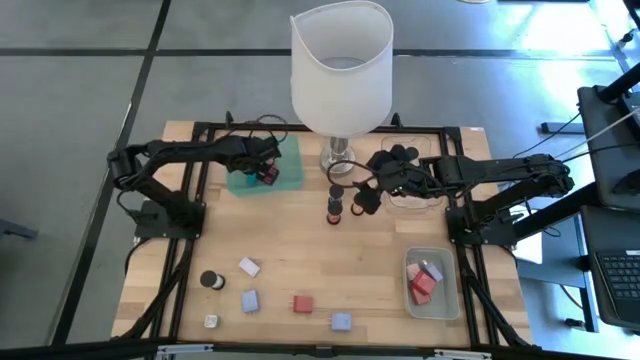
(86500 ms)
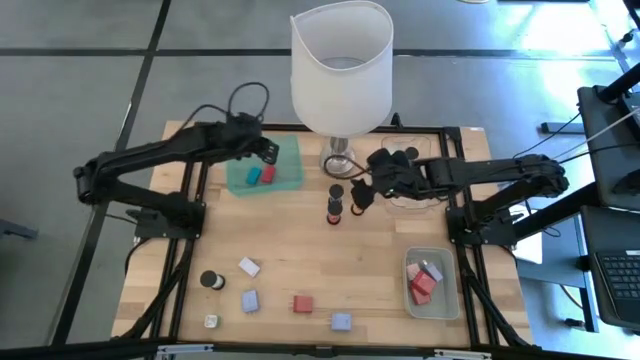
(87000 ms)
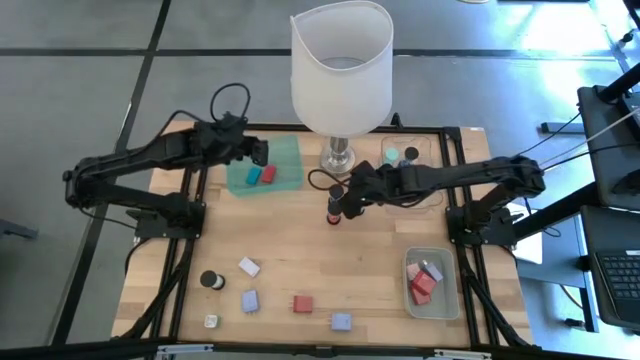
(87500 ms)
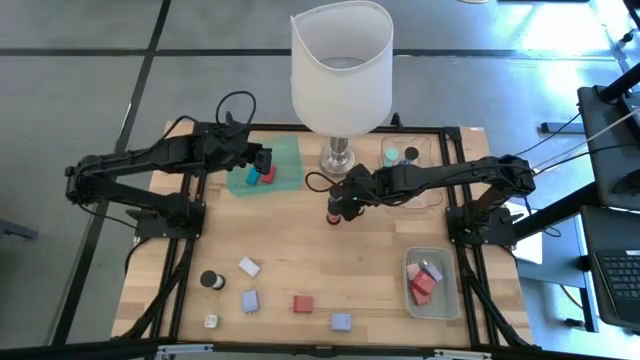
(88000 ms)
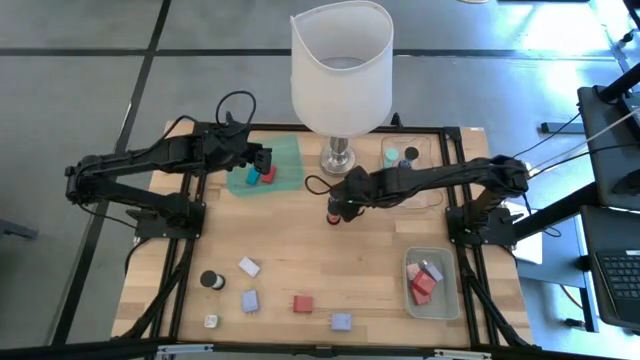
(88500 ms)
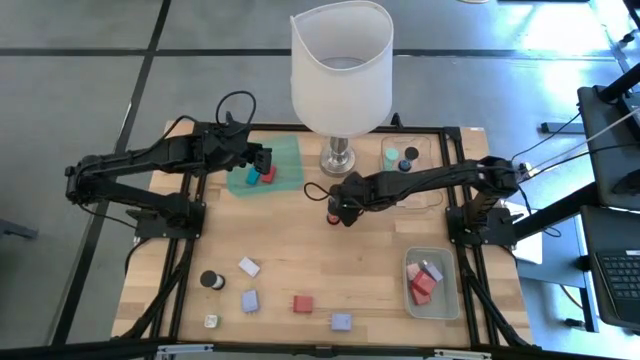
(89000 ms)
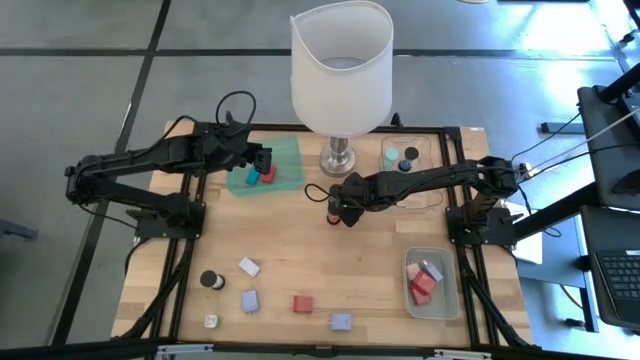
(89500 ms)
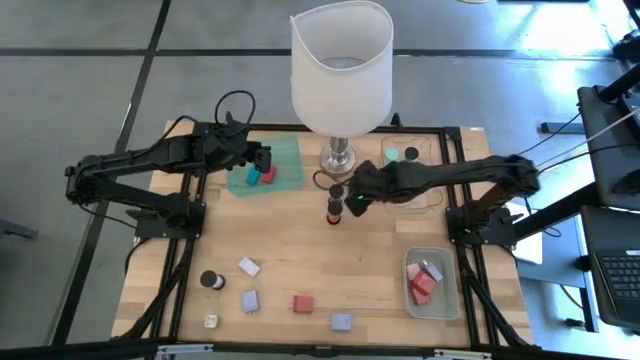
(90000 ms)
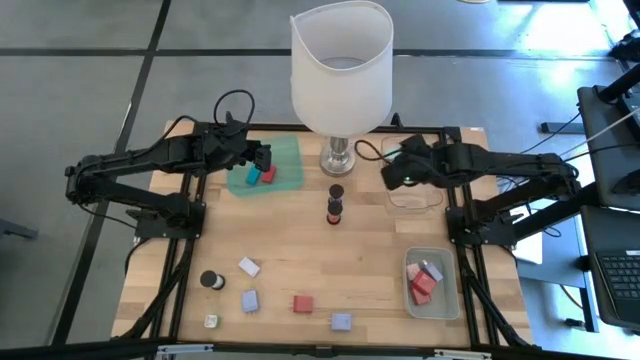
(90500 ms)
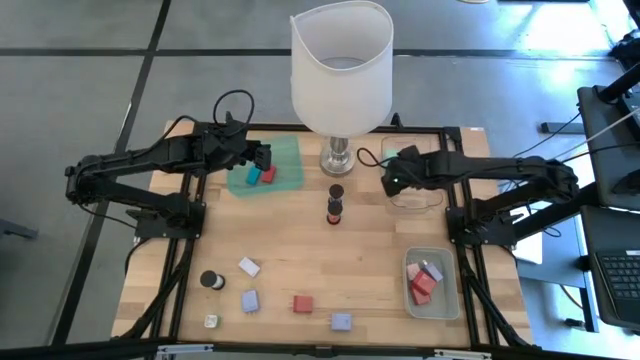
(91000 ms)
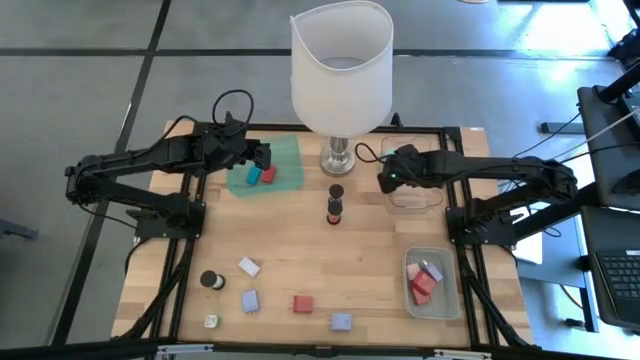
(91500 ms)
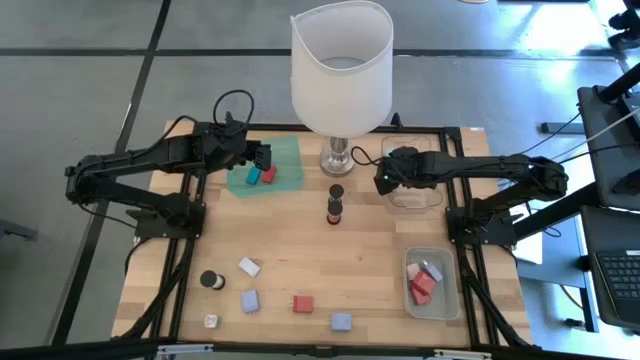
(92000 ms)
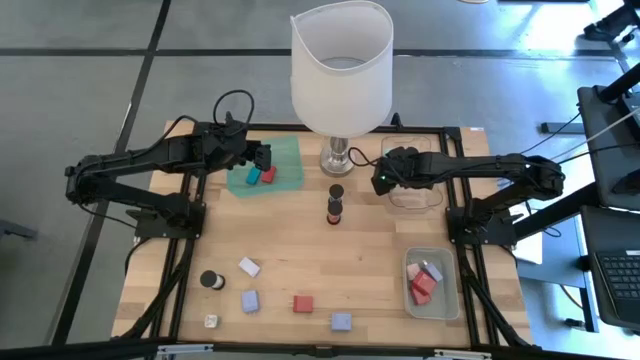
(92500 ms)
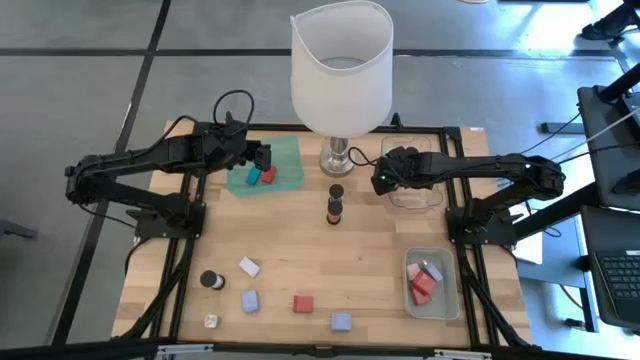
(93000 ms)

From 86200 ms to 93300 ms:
Task: Pick & Place Office items
Put the yellow hourglass into the transparent bin

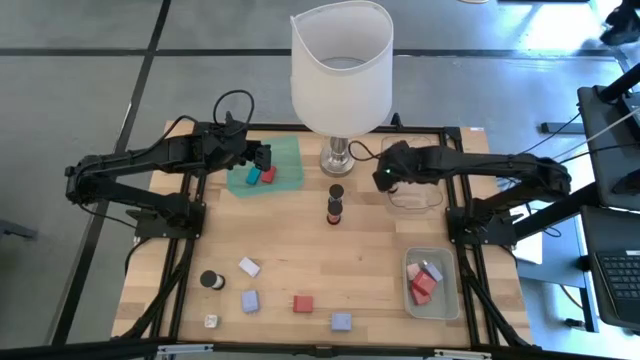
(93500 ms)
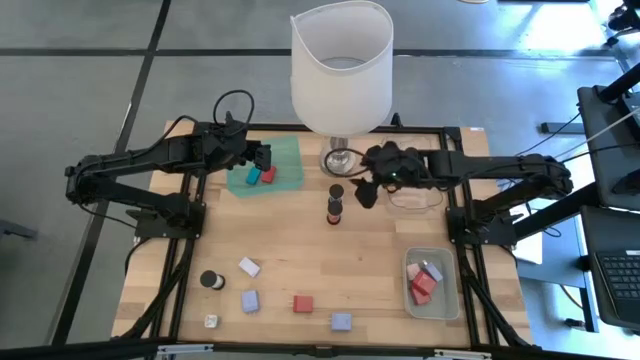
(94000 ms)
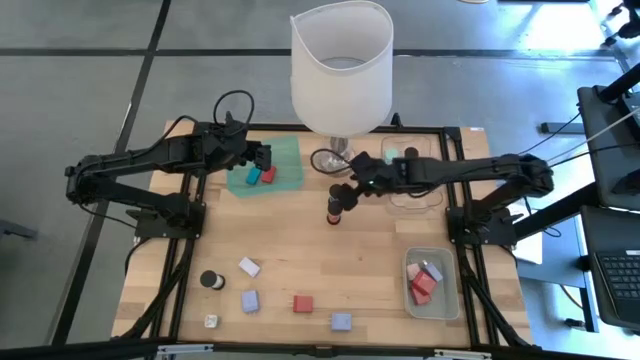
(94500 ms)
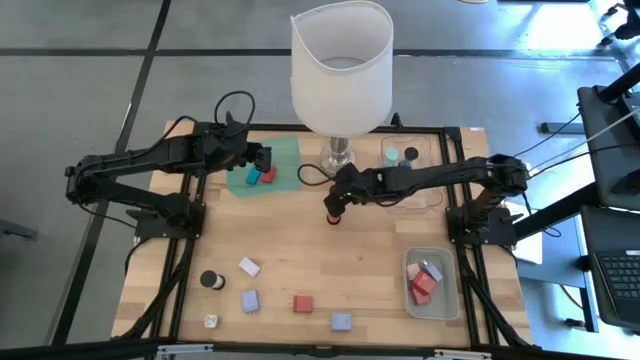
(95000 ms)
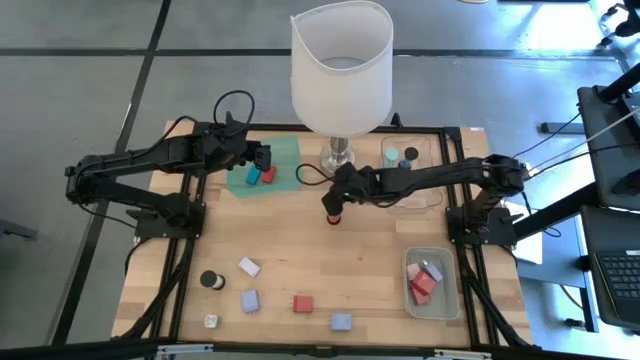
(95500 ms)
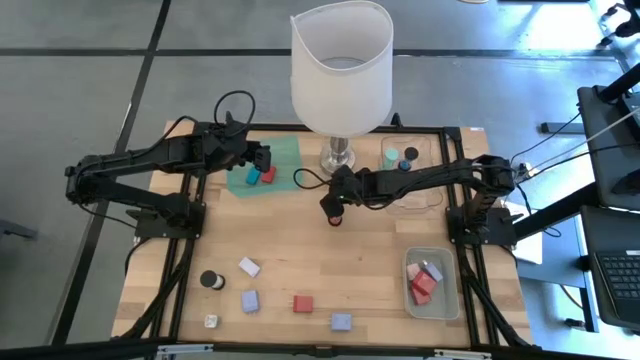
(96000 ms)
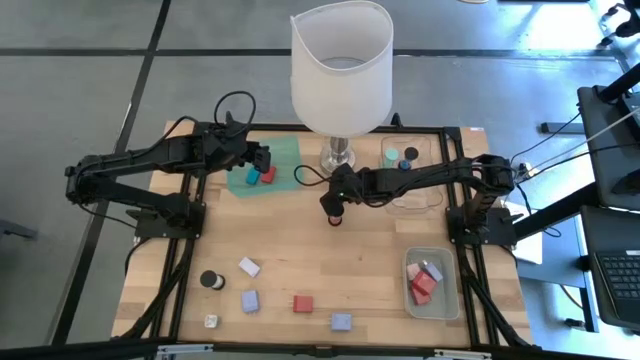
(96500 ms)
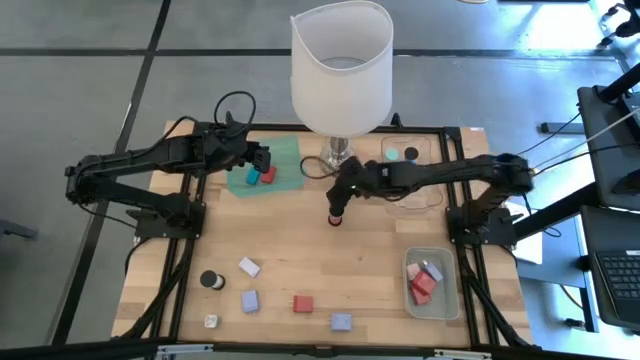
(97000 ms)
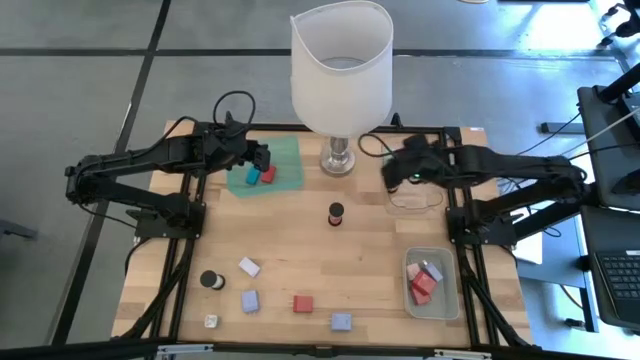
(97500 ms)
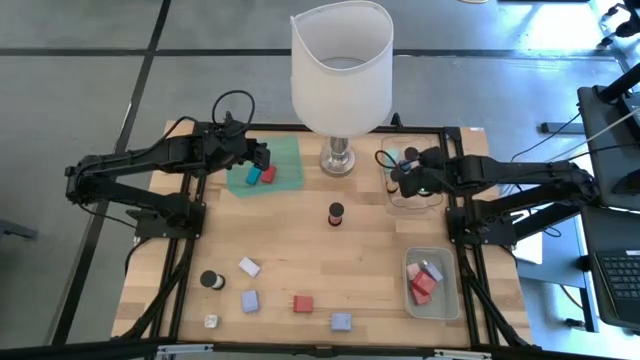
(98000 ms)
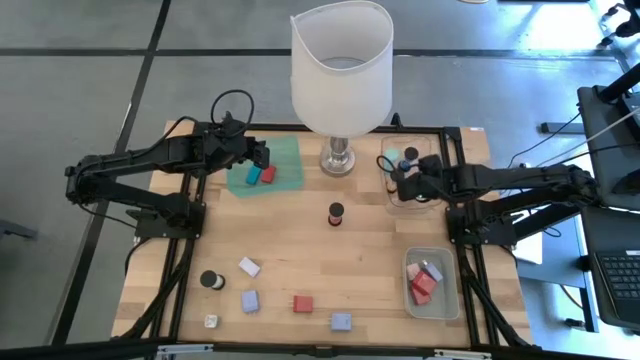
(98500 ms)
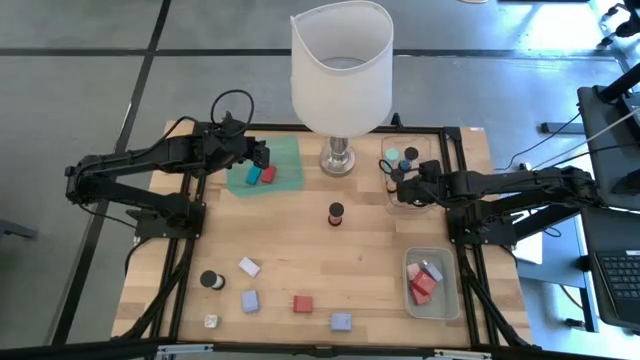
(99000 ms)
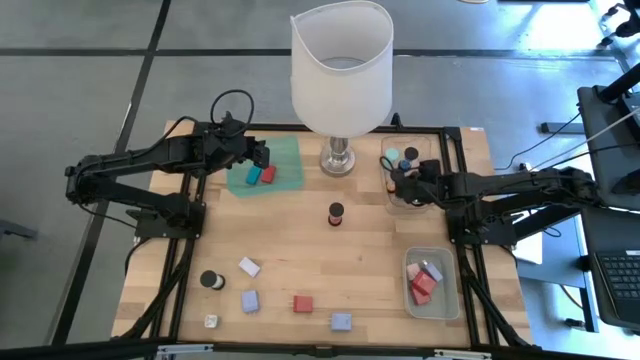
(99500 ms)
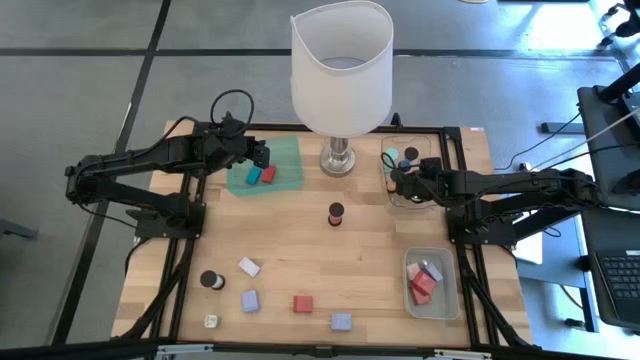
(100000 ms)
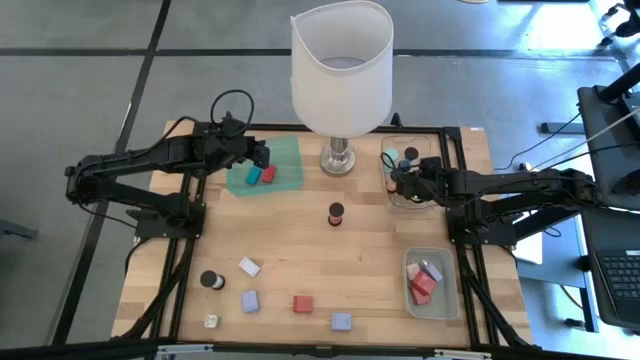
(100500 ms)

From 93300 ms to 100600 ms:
Put the blue hourglass into the transparent bin

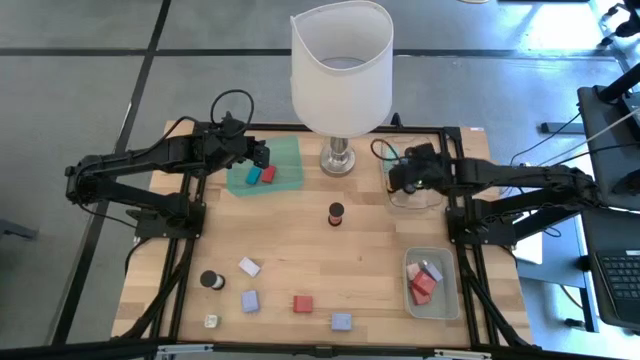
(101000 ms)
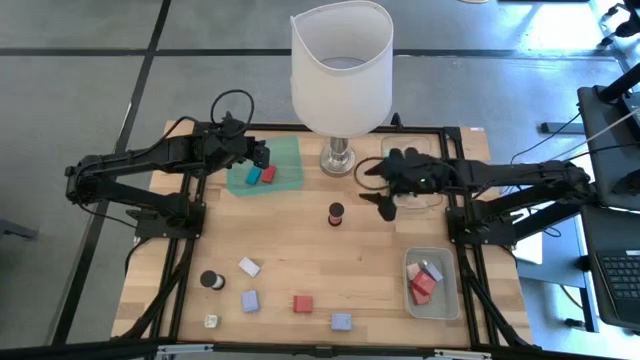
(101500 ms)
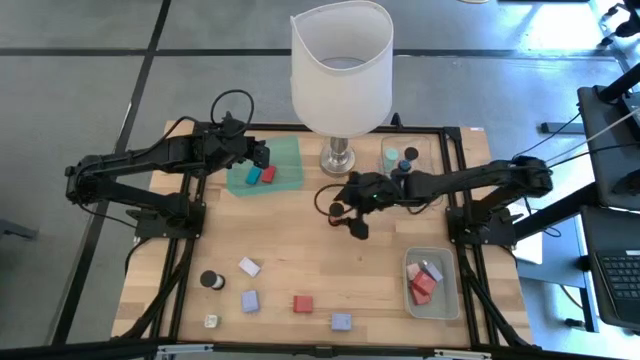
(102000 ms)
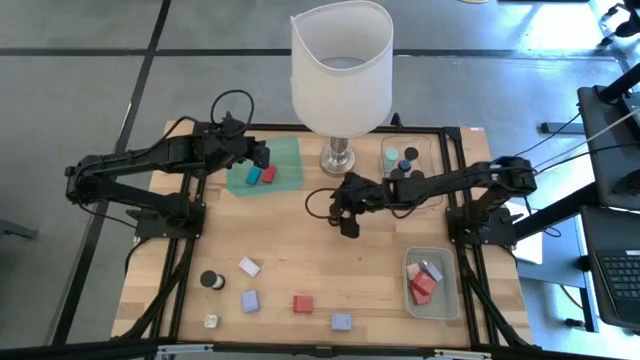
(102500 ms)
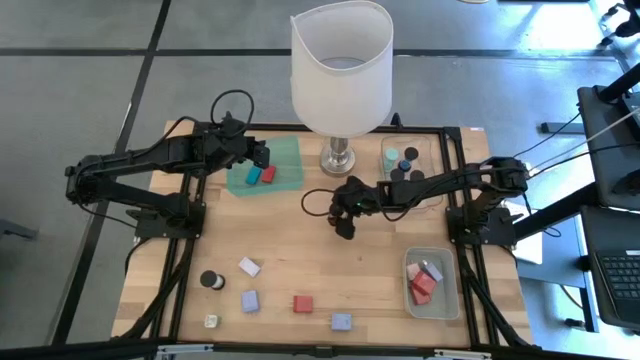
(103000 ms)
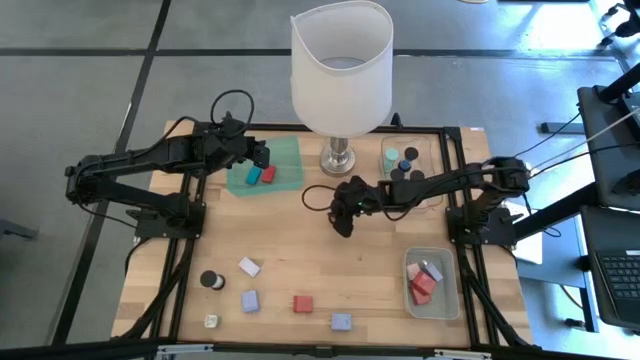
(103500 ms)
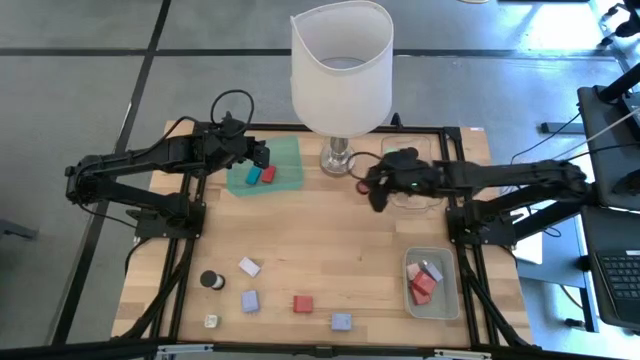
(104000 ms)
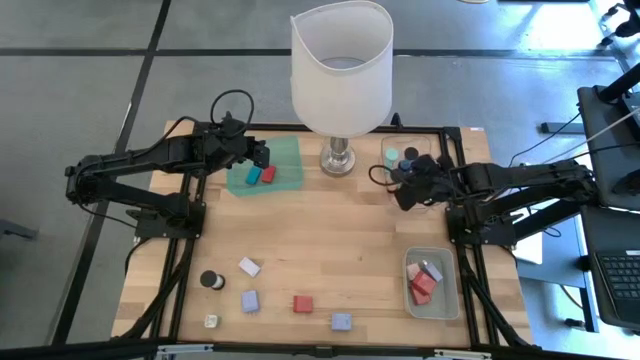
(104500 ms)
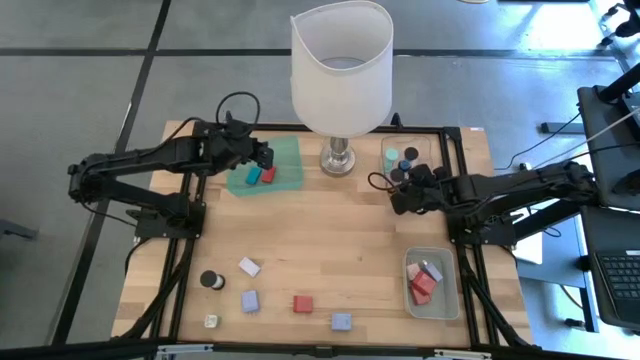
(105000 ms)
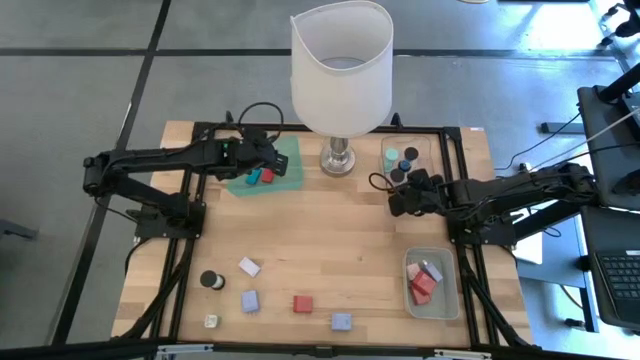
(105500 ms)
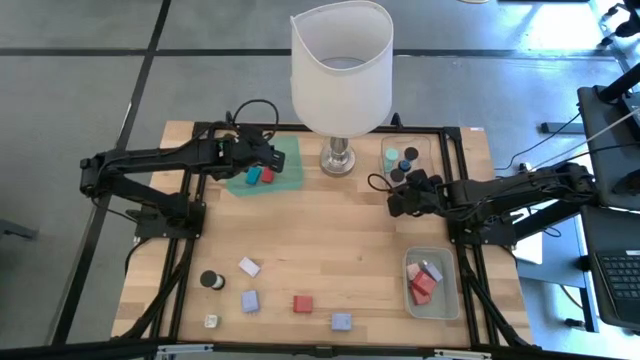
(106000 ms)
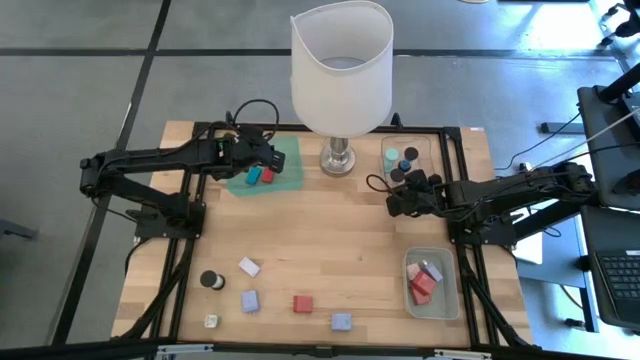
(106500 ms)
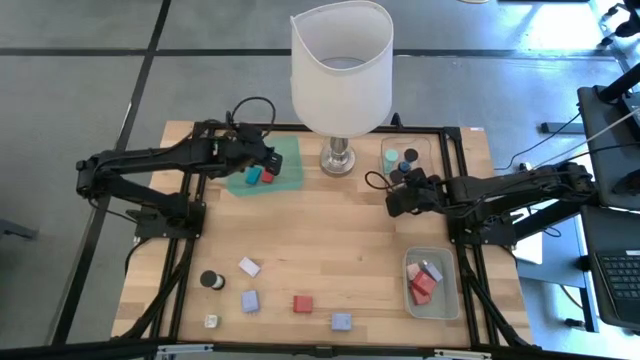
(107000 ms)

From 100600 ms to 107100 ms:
Put the red hourglass into the transparent bin
